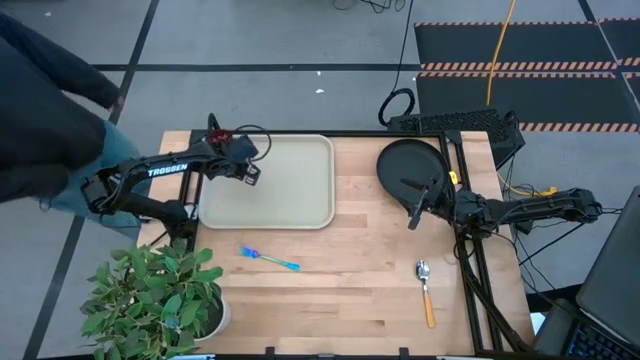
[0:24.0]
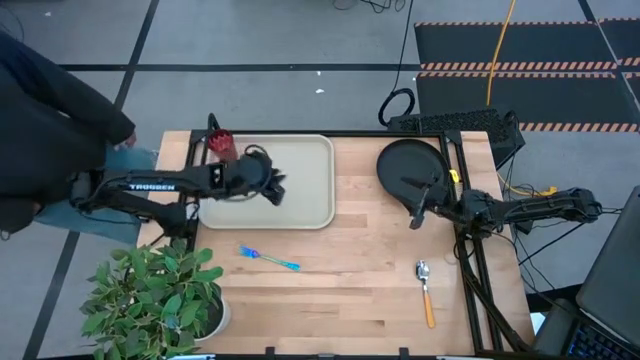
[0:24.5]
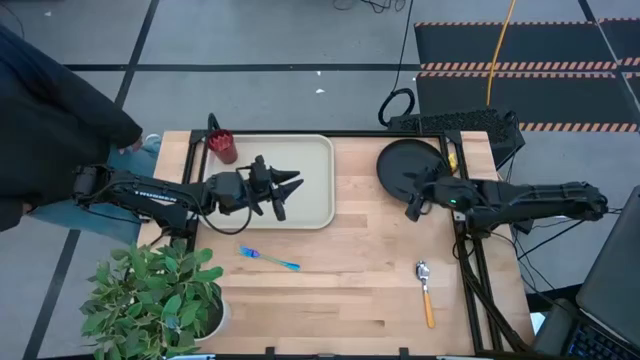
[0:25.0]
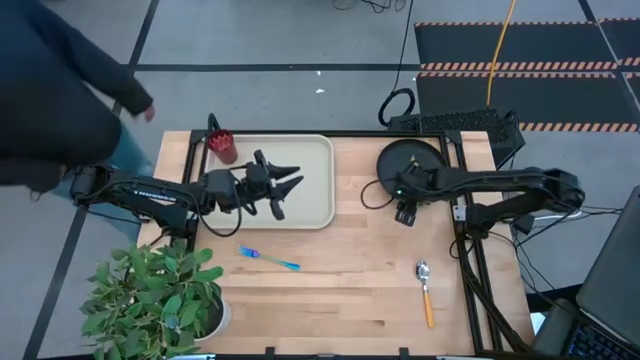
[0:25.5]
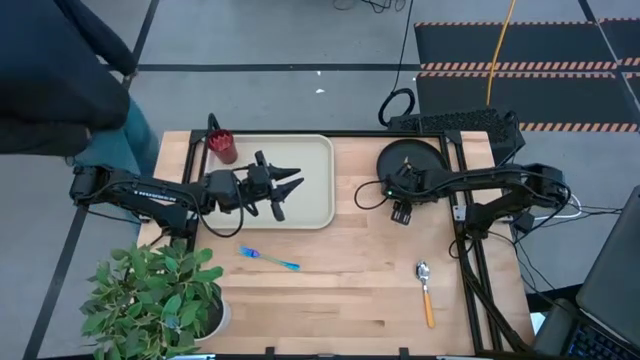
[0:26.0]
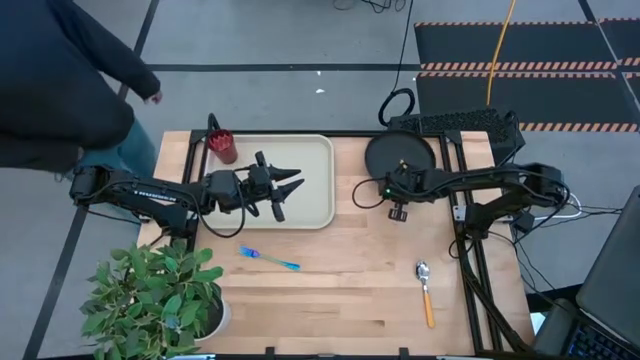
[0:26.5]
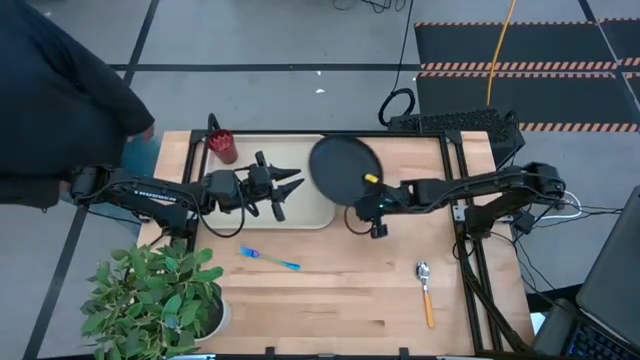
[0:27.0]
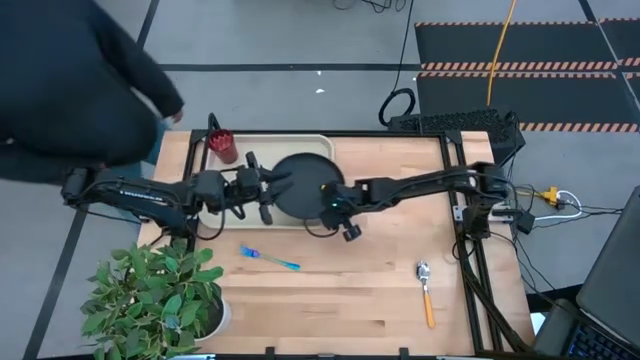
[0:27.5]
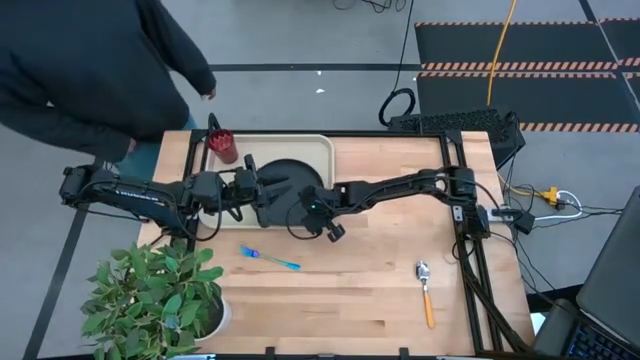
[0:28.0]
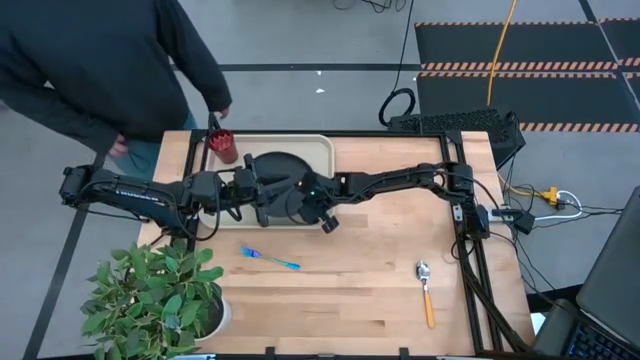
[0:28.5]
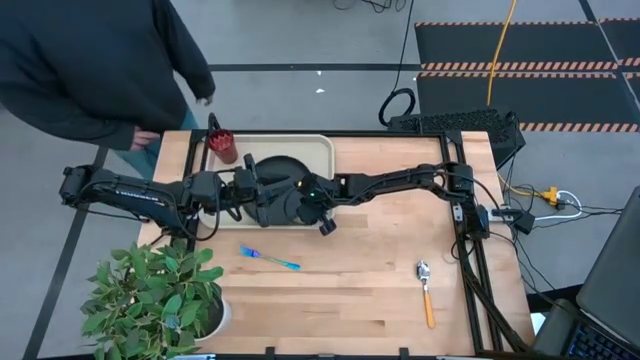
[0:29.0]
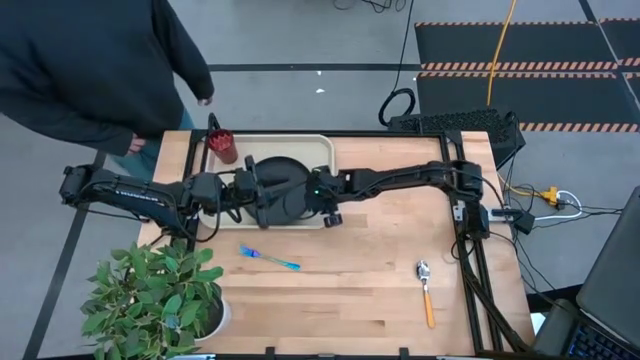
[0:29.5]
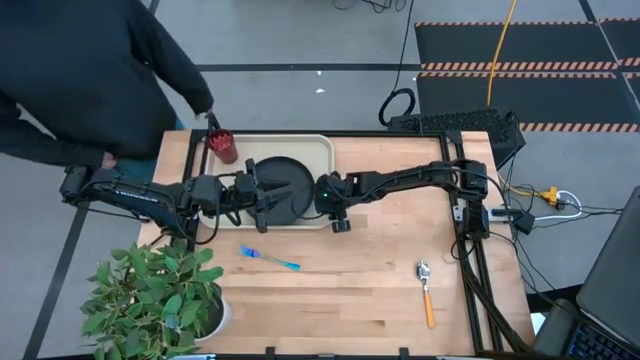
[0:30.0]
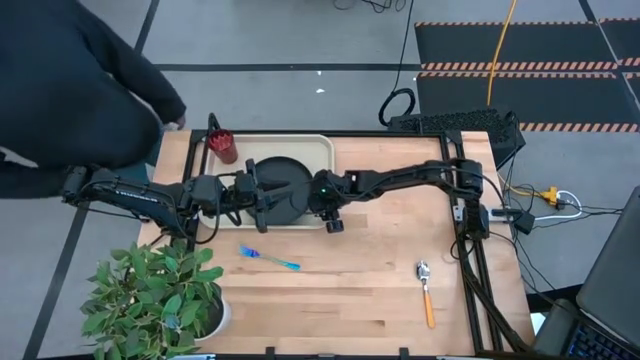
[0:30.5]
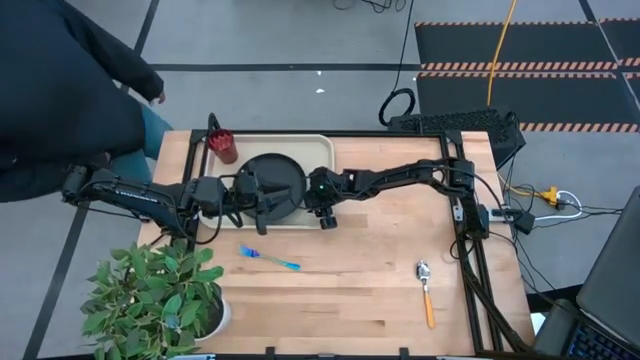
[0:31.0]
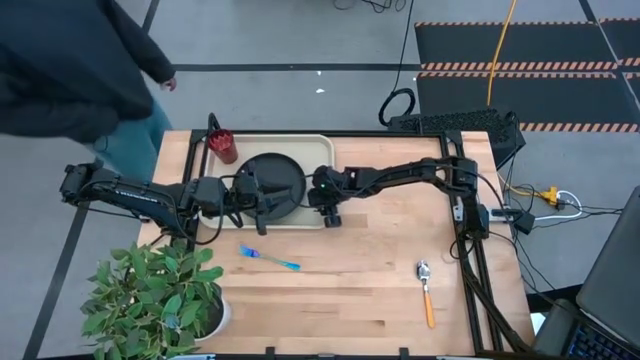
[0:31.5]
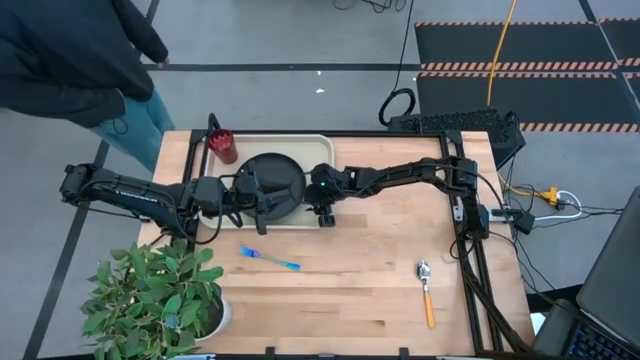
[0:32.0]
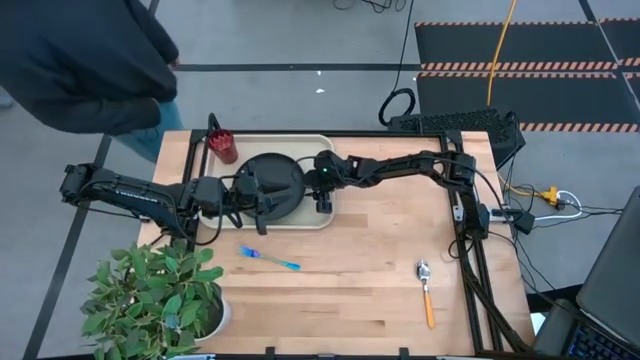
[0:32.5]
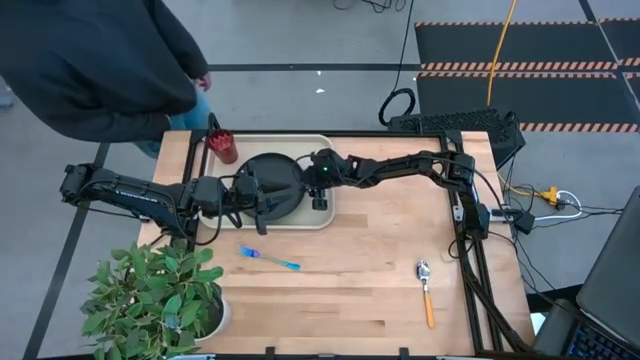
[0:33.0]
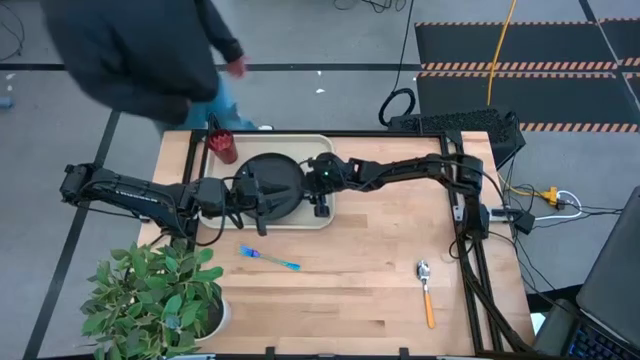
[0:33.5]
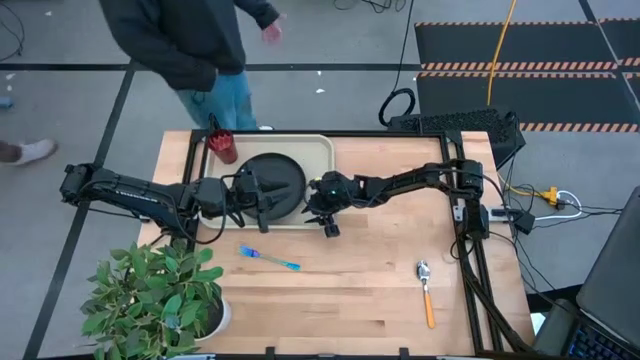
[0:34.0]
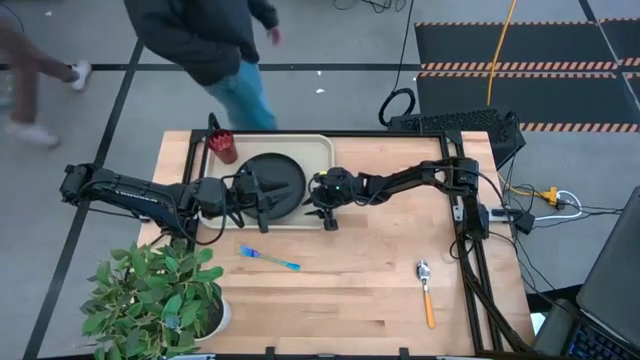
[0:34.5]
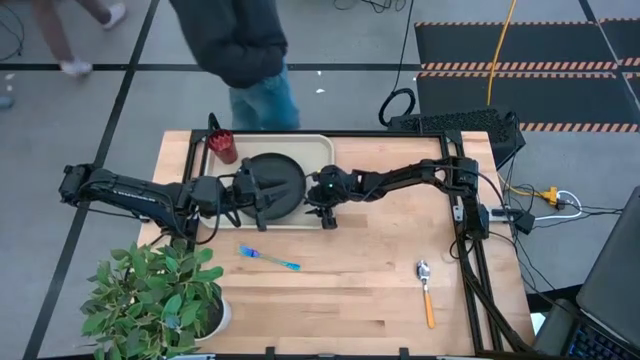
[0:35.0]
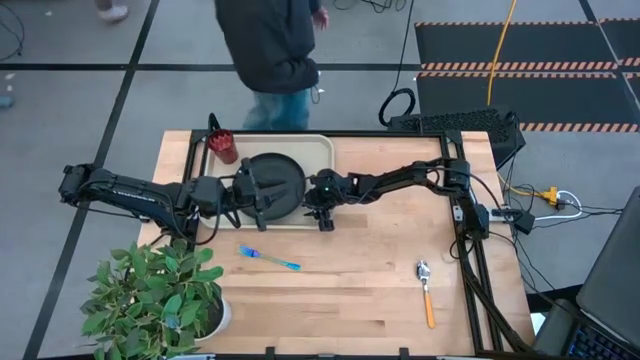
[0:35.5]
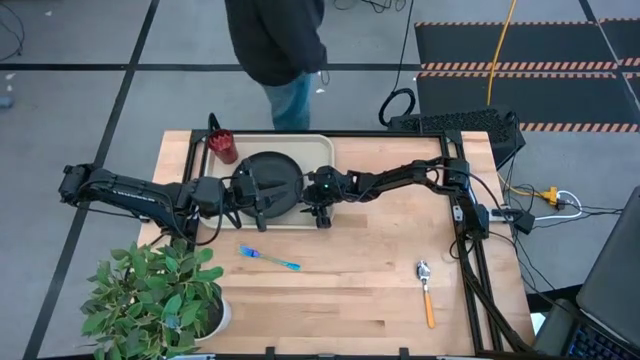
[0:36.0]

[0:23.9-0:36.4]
Task: Pick and place plate/cup/fork/spoon on tray
Put the black plate on the bottom right of the red cup

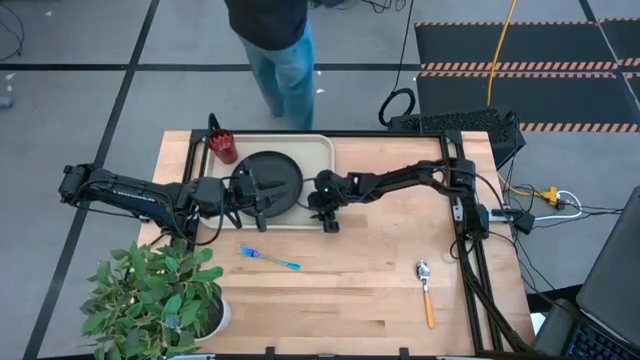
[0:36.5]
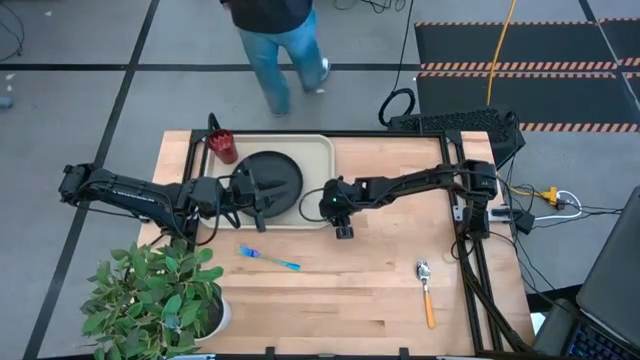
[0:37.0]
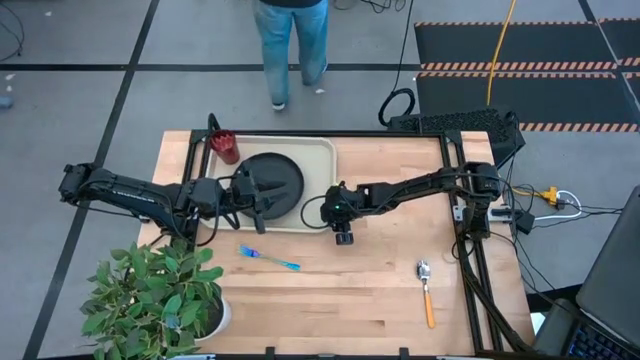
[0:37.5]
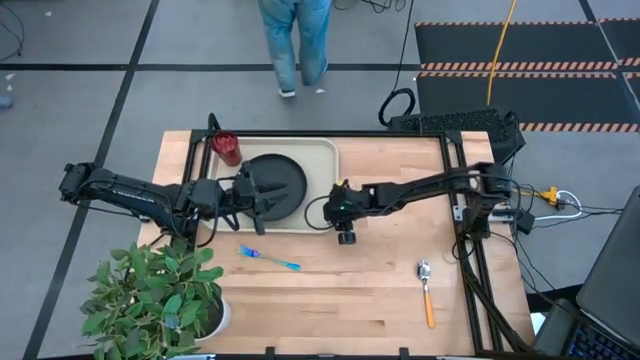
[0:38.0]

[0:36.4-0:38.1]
Adjust the gray tray

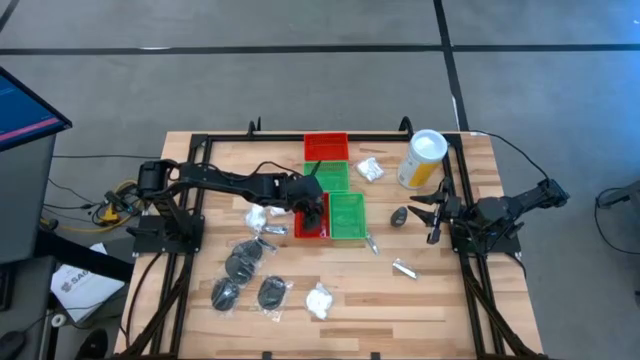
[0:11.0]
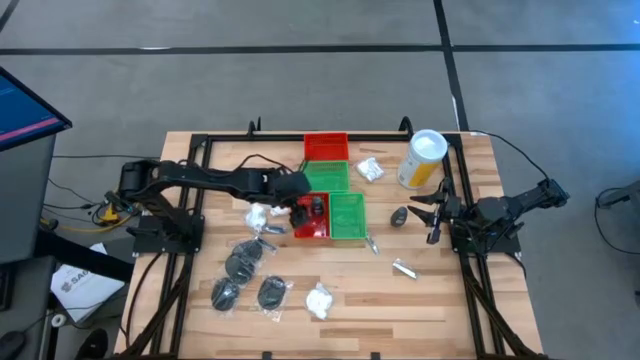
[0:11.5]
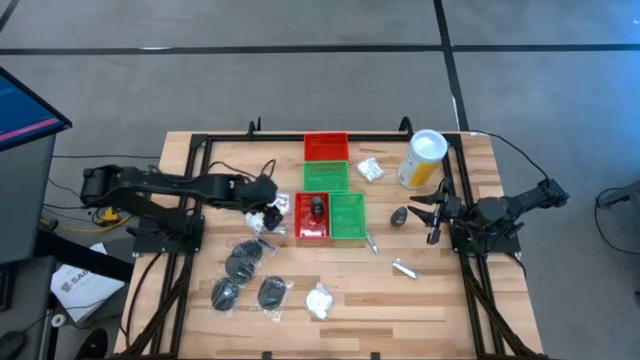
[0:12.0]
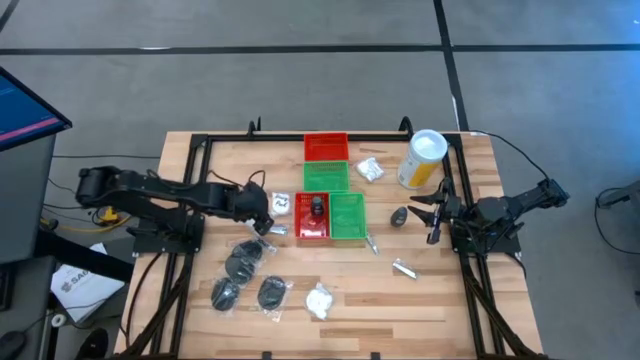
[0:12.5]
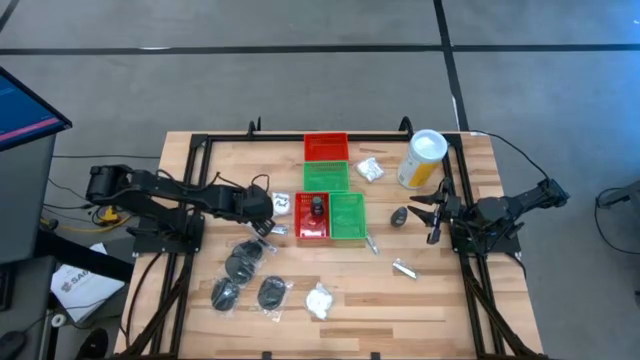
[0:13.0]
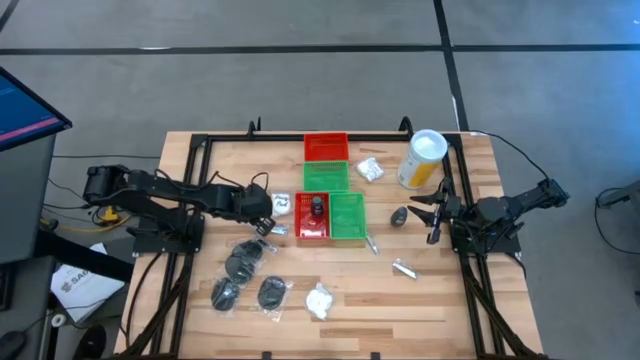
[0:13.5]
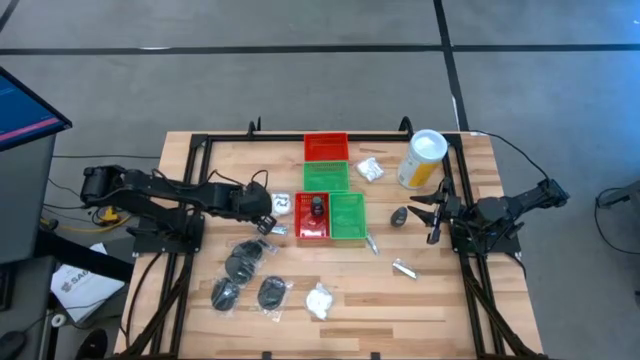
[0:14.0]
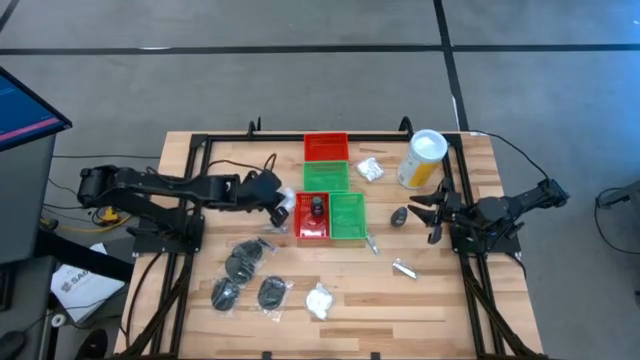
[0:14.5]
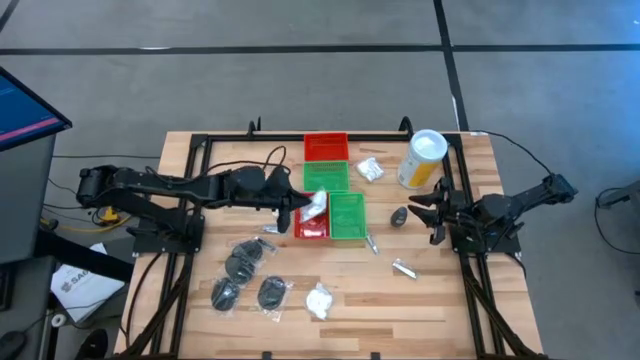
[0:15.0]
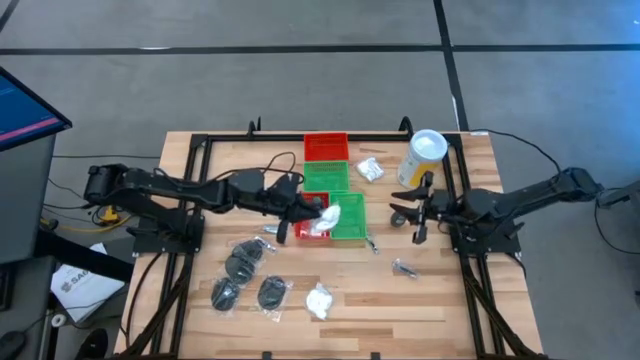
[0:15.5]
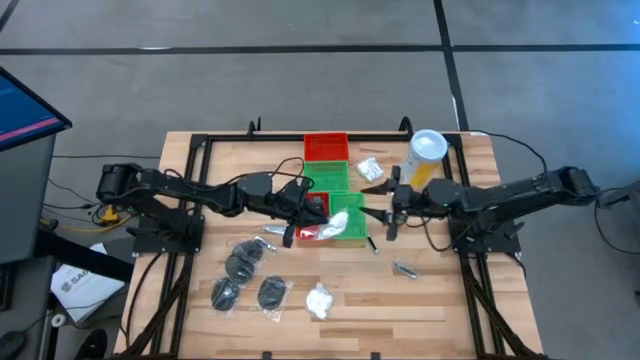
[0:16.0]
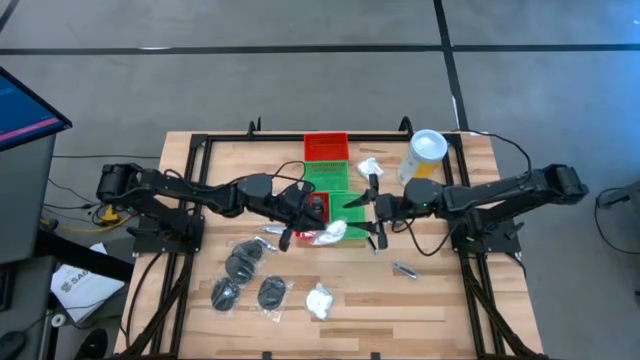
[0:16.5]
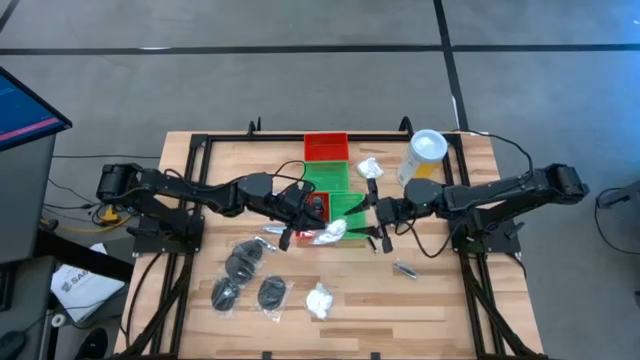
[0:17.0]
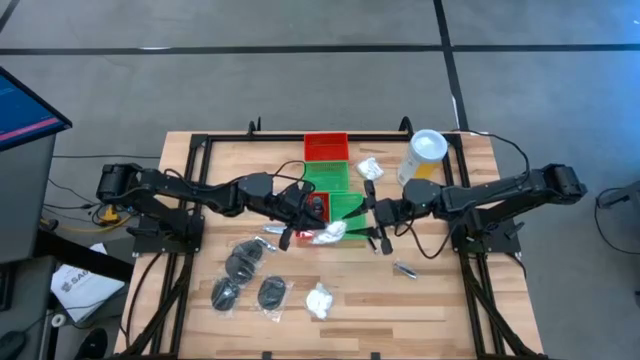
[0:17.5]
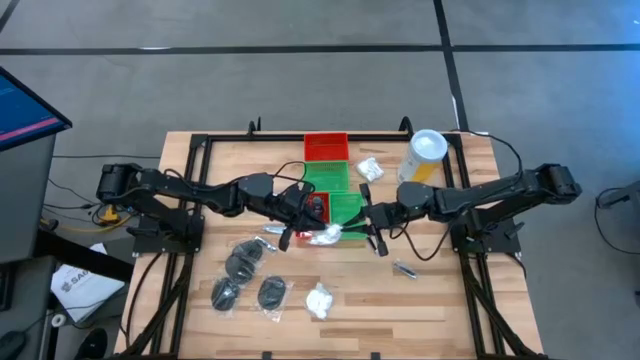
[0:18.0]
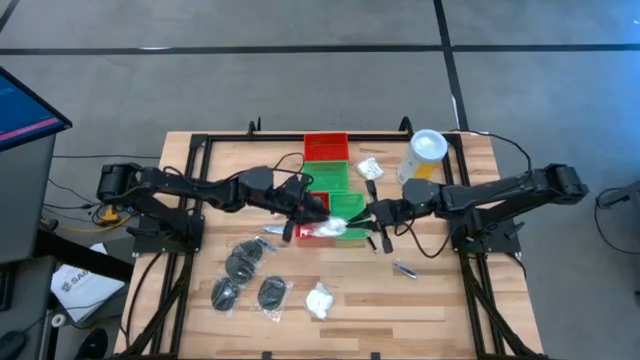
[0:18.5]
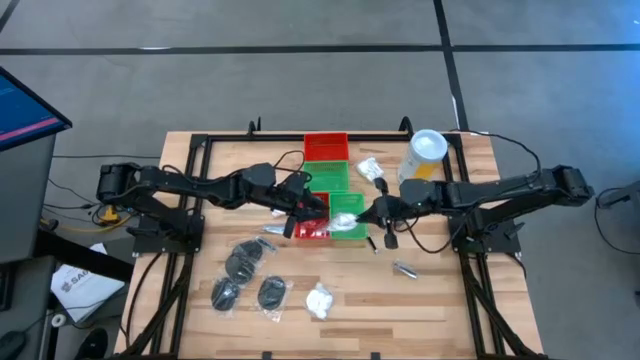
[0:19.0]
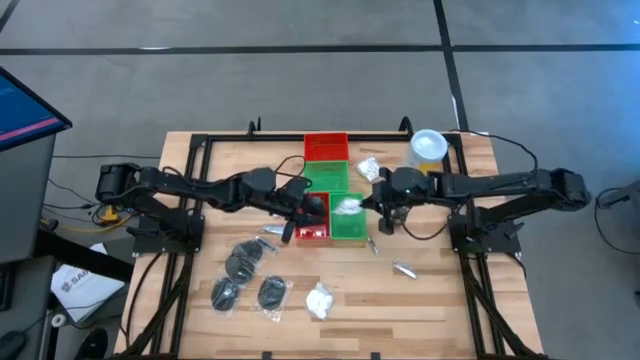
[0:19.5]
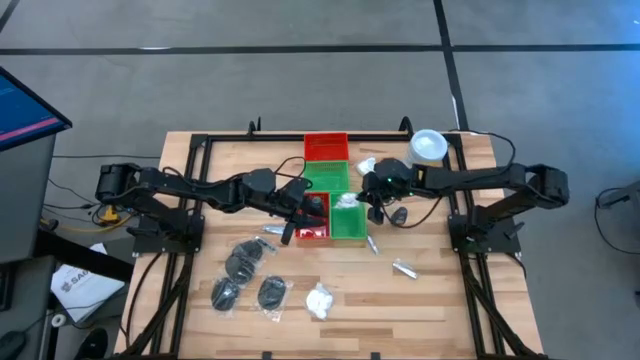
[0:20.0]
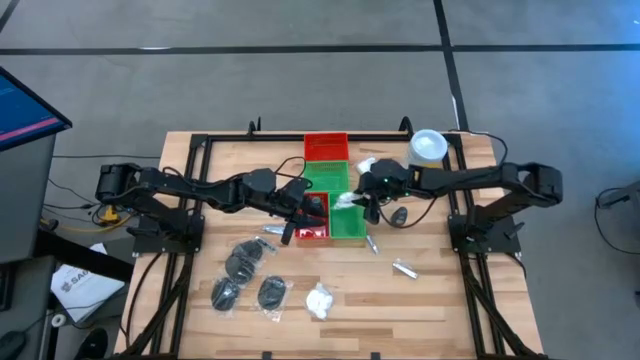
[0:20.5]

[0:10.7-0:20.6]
Task: Pick & Place Travel size toiletries
Put the white cotton pack into the bottom green bin
